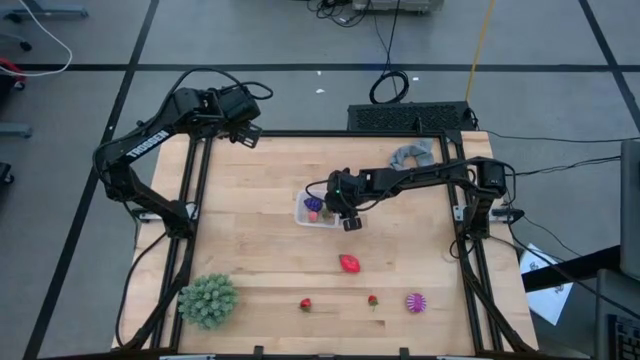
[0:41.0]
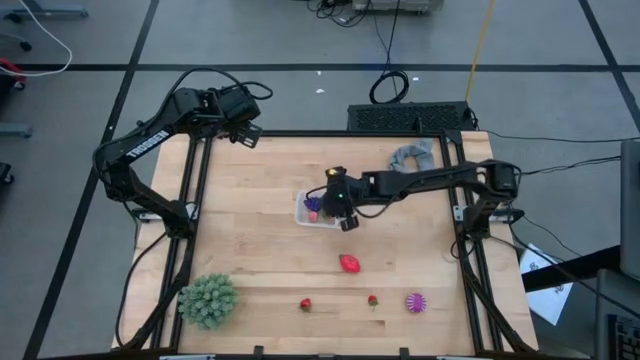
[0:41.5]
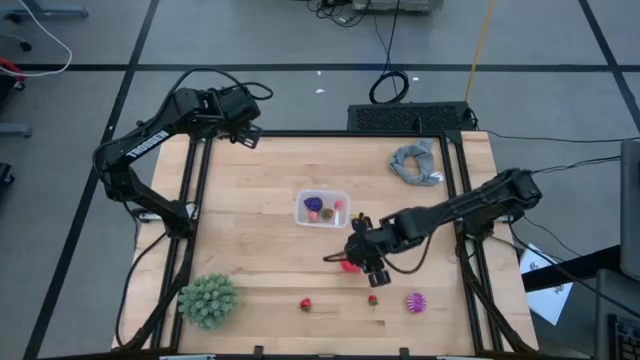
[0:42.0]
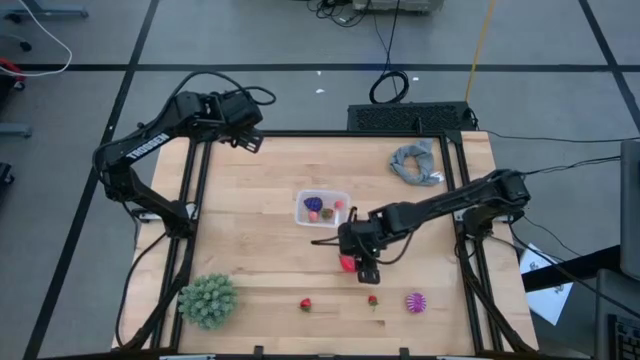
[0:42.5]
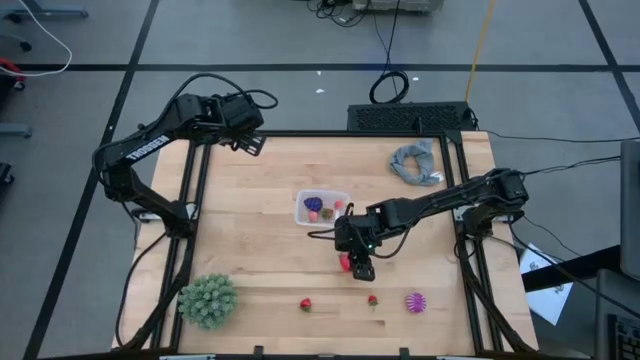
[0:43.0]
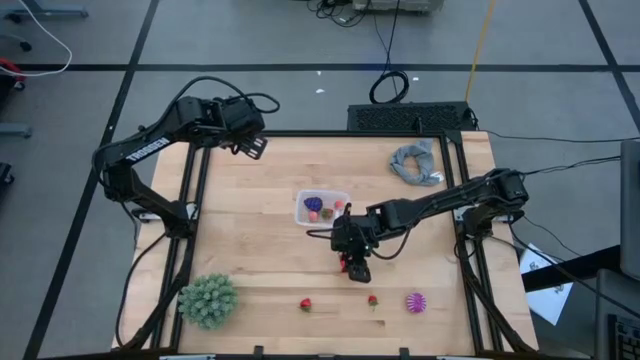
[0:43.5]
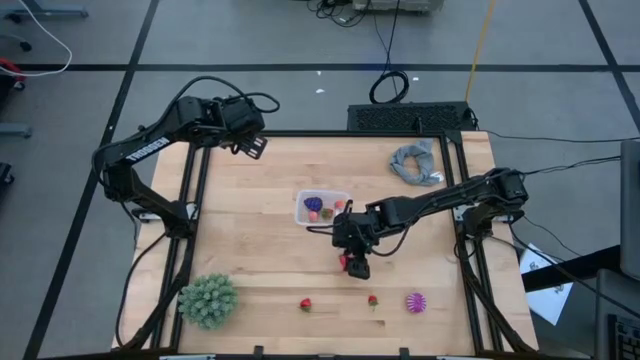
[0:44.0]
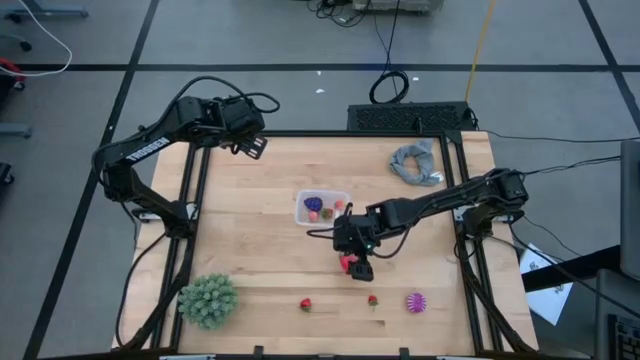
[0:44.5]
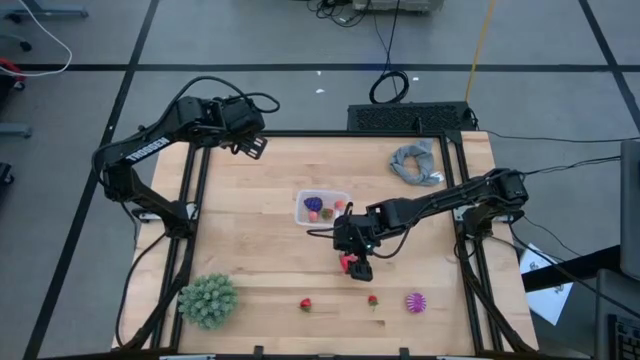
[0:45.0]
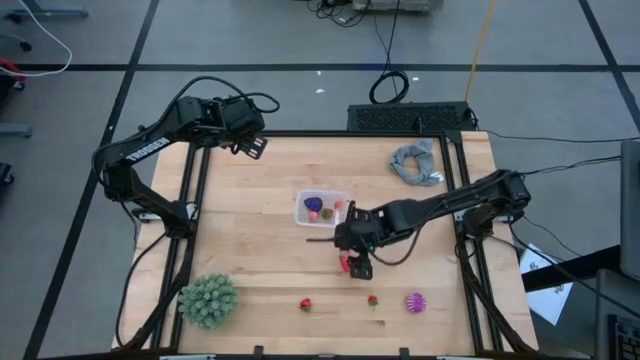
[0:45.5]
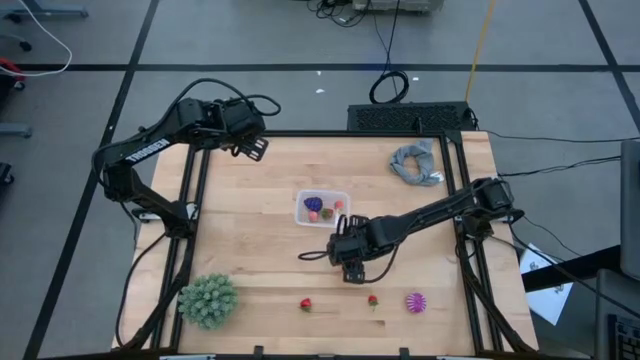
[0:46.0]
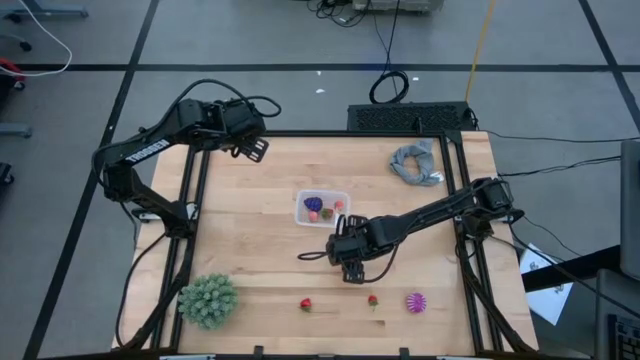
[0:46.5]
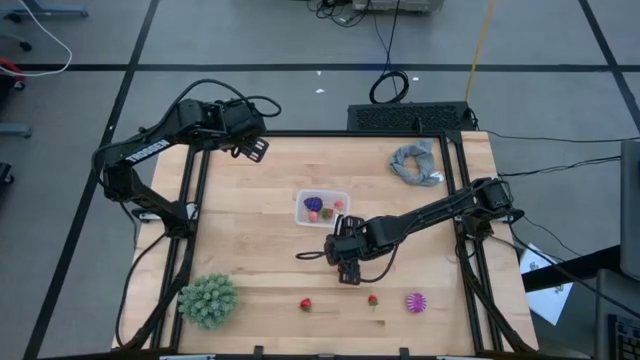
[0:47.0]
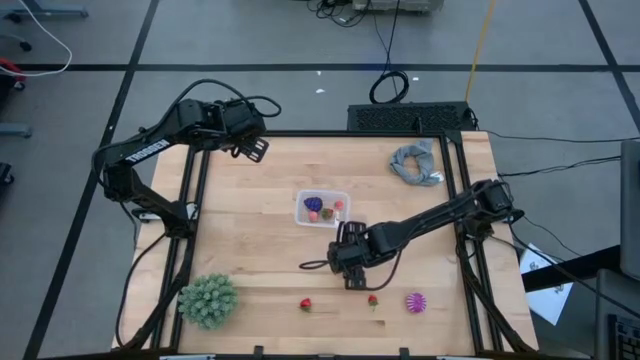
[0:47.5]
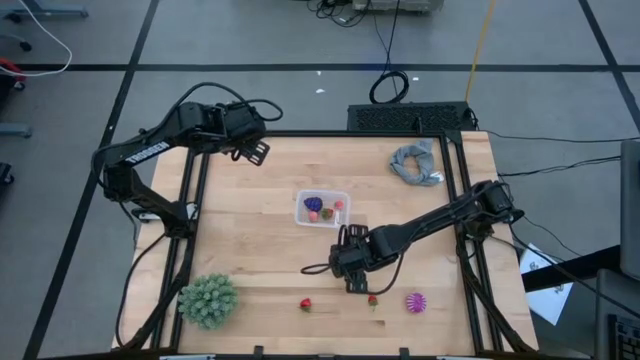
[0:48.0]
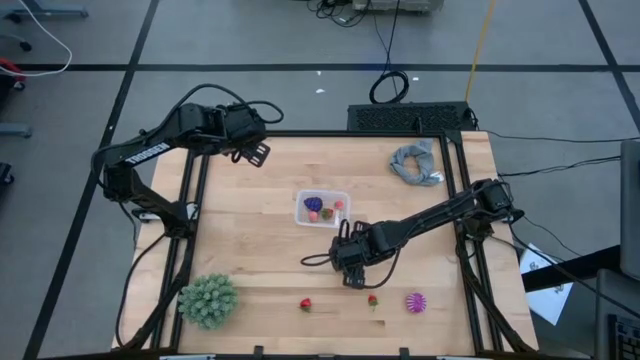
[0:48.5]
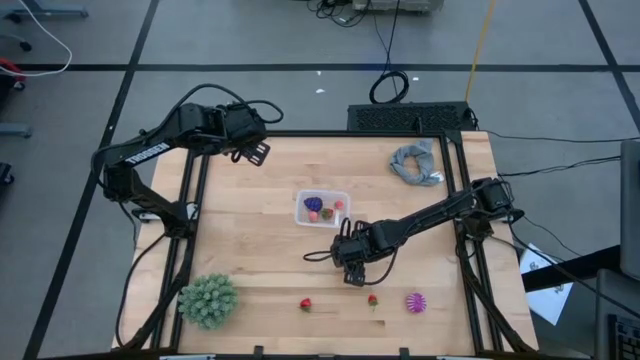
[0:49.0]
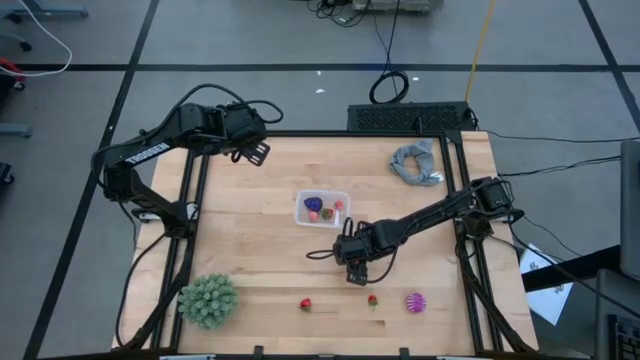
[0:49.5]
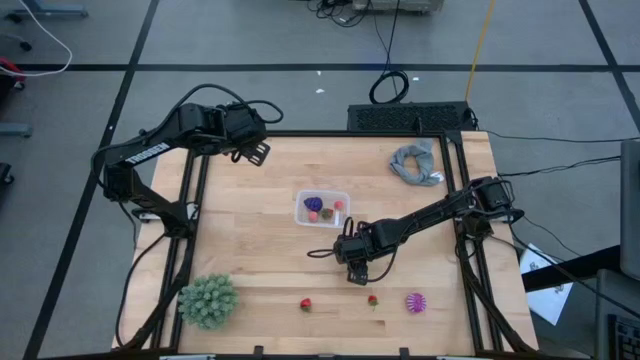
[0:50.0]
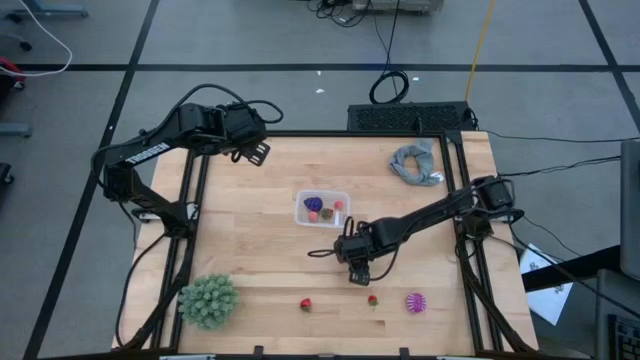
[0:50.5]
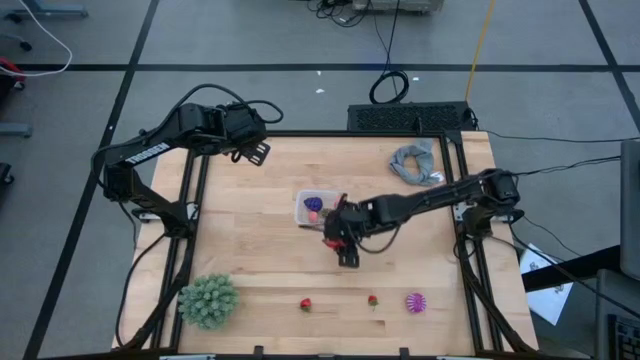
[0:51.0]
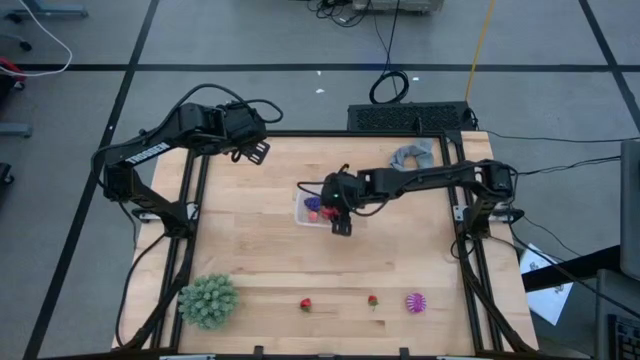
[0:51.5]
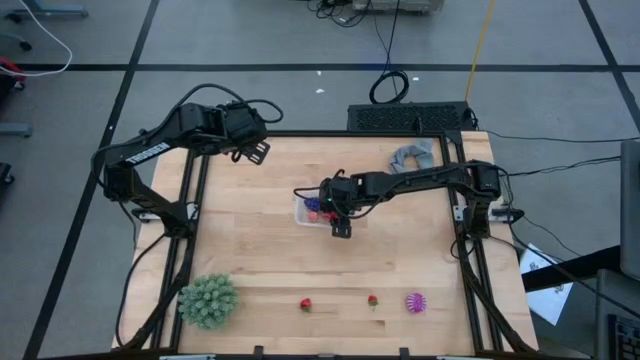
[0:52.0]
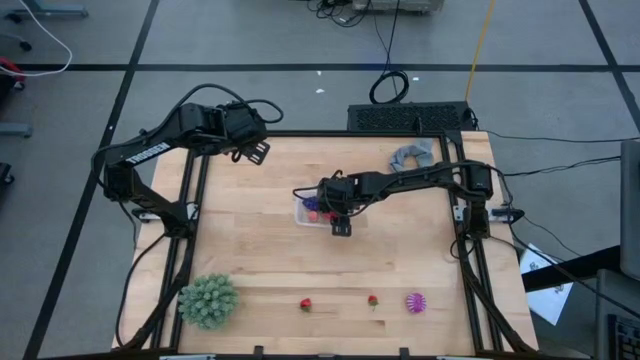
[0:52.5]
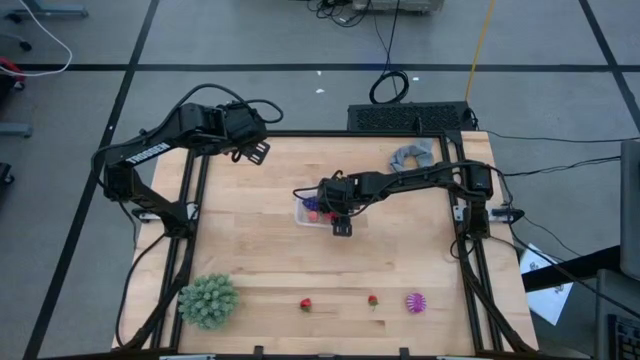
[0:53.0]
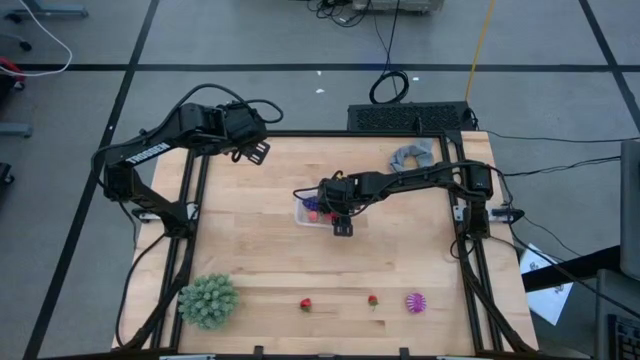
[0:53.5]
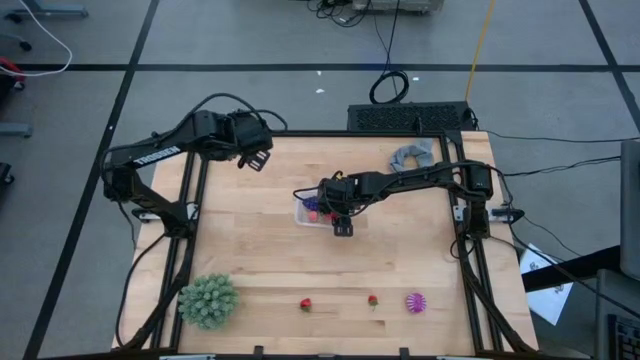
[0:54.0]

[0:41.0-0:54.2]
Task: Pick and placing Produce into tupperware
Put the dragonfruit into the transparent bin

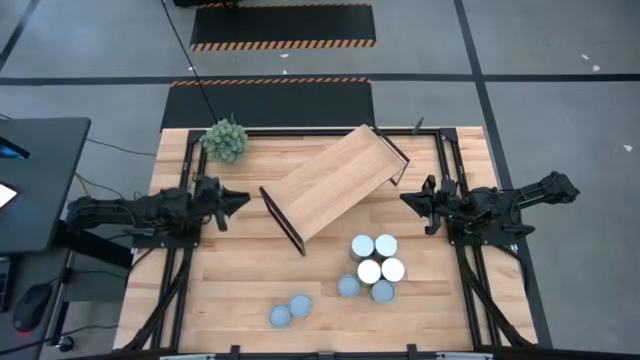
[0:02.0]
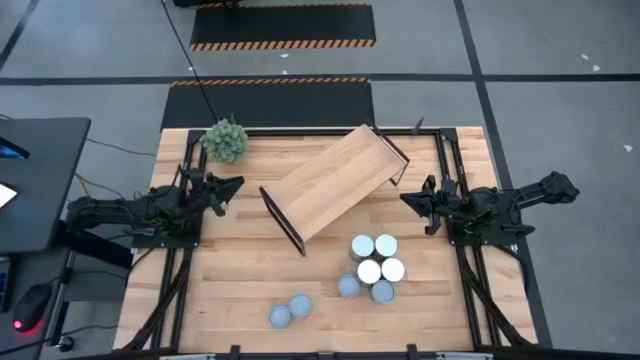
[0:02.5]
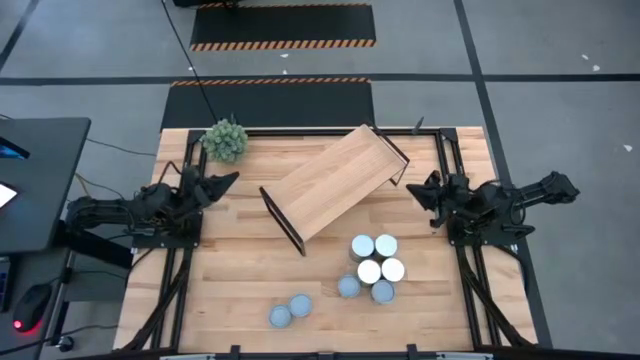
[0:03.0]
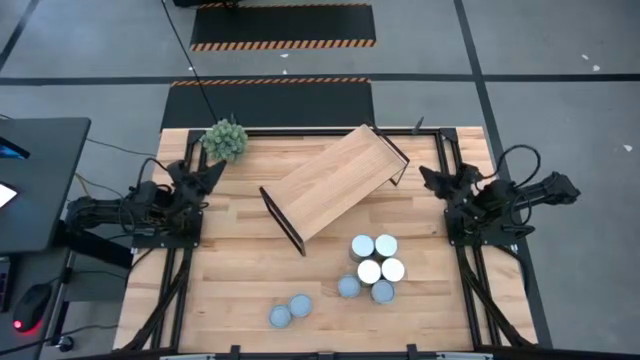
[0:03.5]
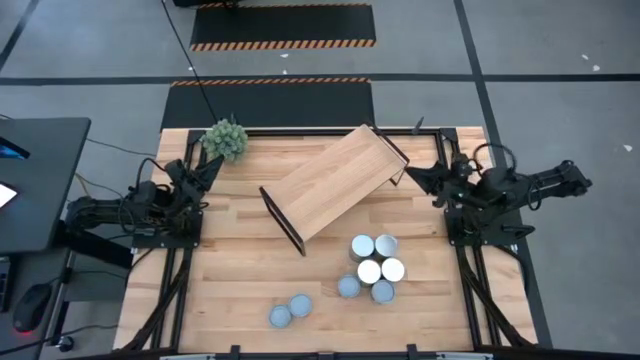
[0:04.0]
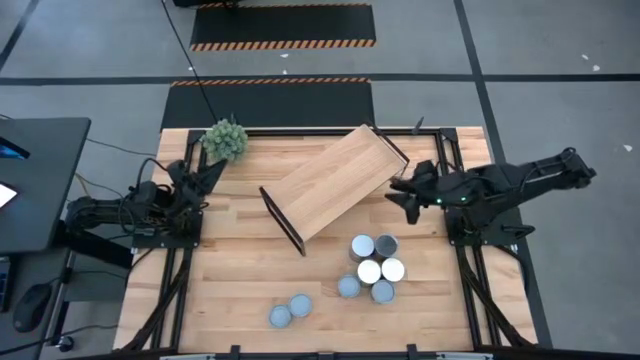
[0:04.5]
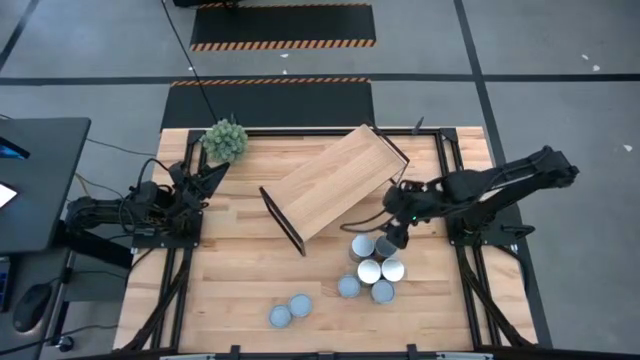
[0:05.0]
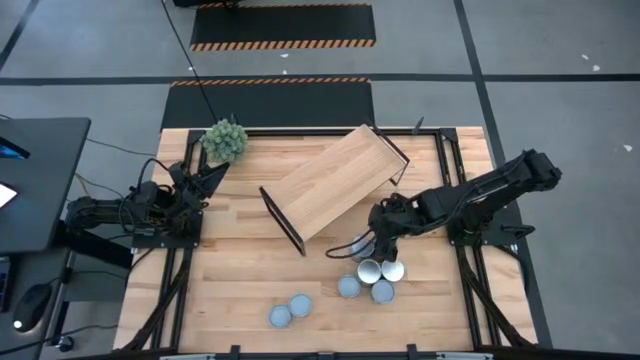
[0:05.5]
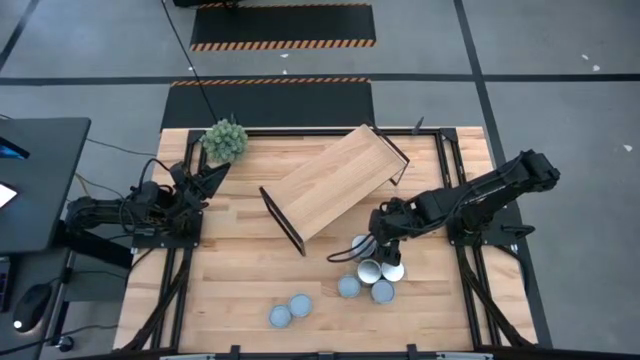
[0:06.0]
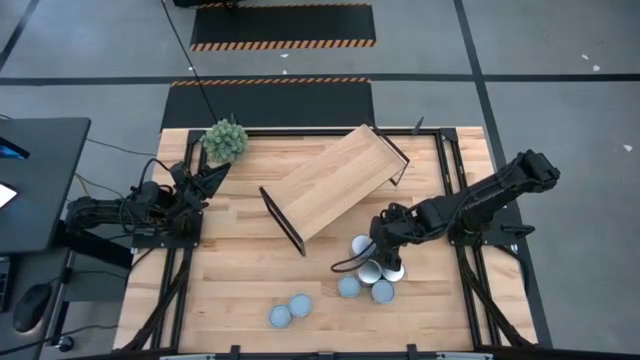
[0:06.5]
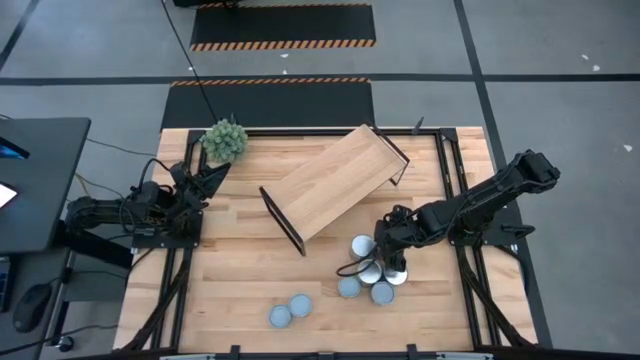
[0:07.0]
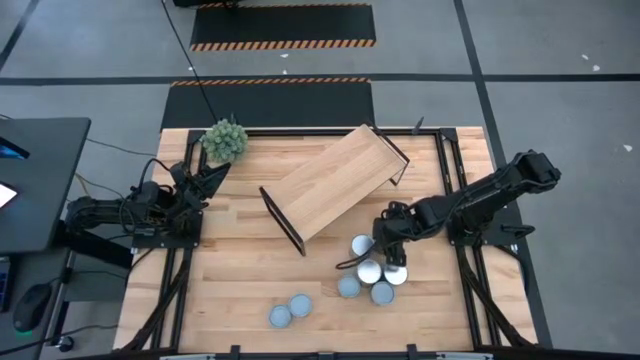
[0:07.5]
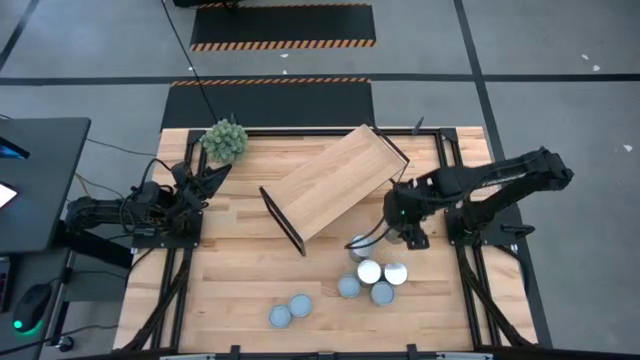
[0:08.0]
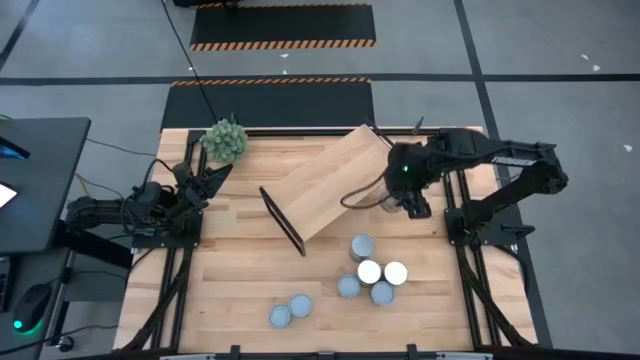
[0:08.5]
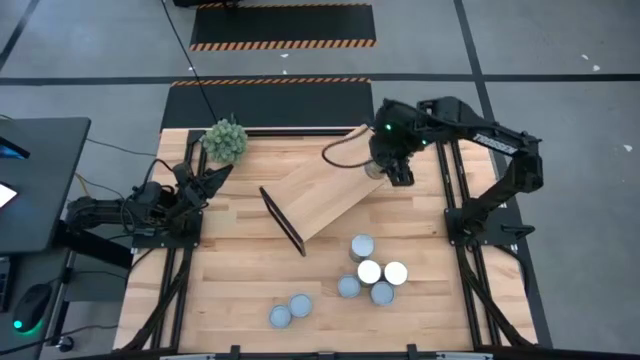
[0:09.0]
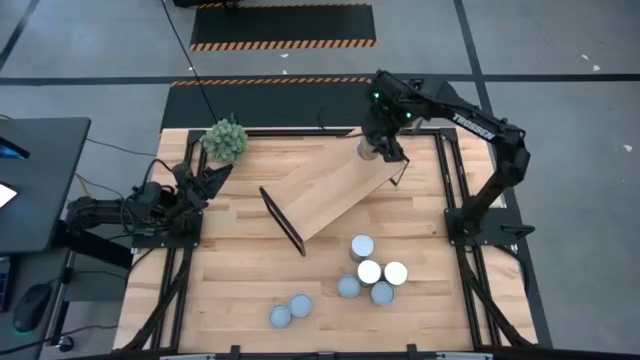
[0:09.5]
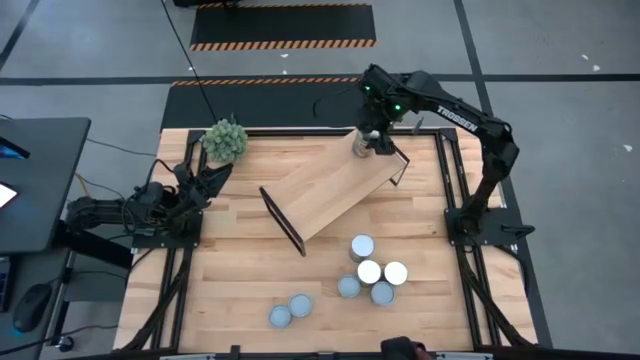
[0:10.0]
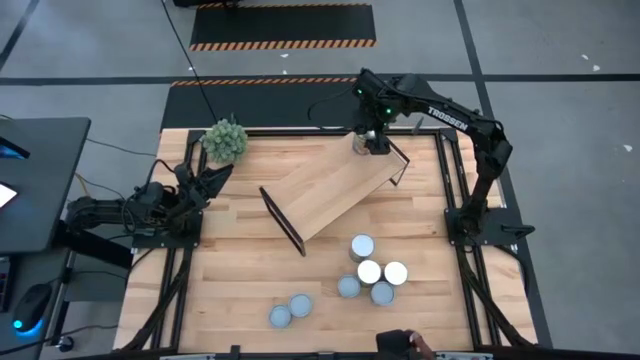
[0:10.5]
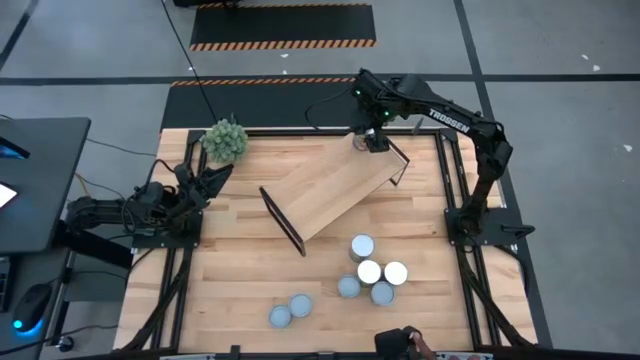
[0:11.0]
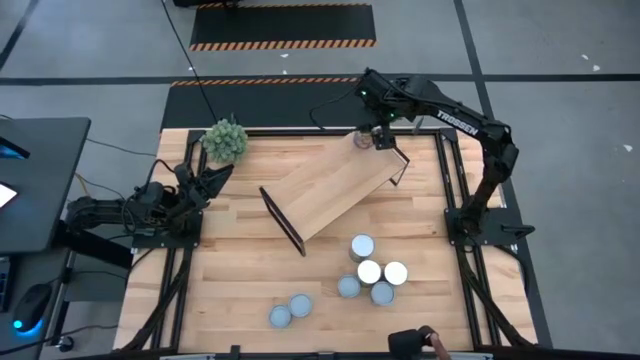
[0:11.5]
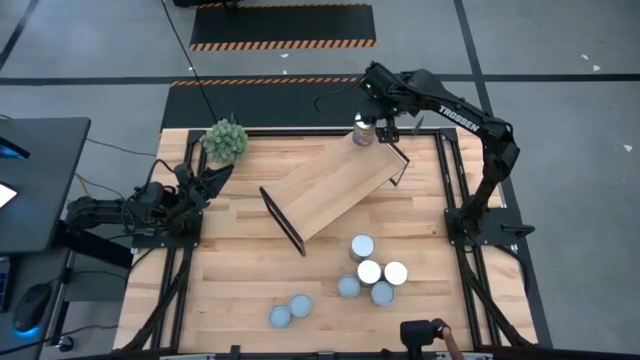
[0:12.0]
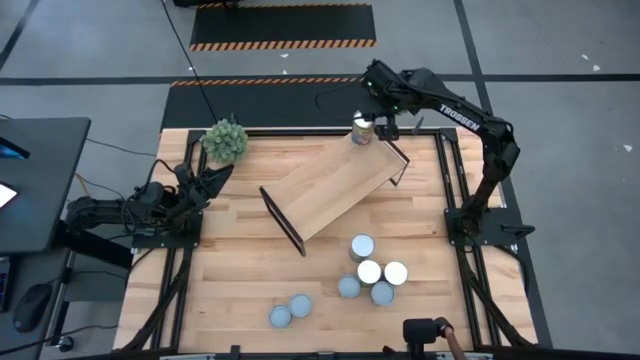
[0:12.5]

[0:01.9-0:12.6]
Task: Pick and place cans onto a shelf
Put the canned peaches on the shelf
